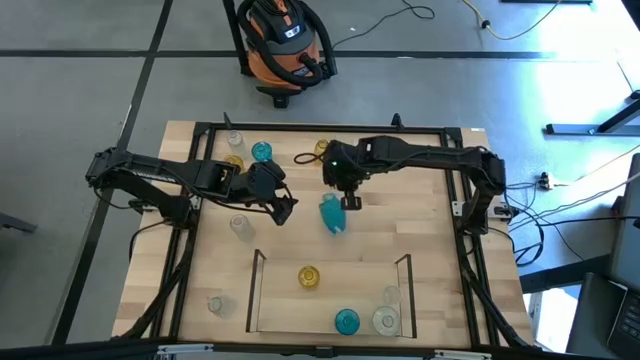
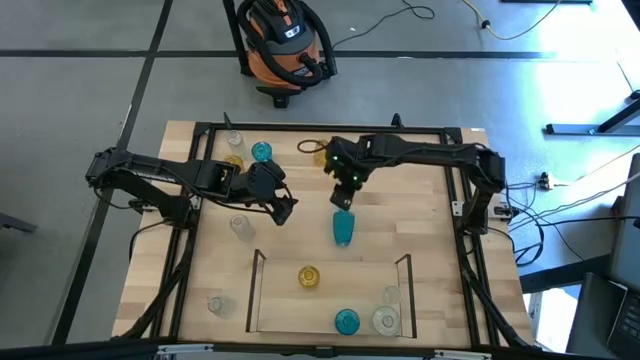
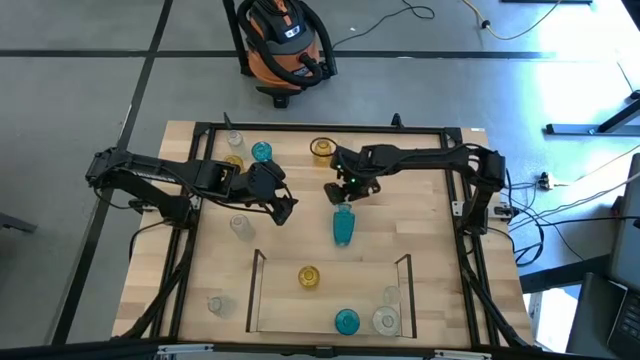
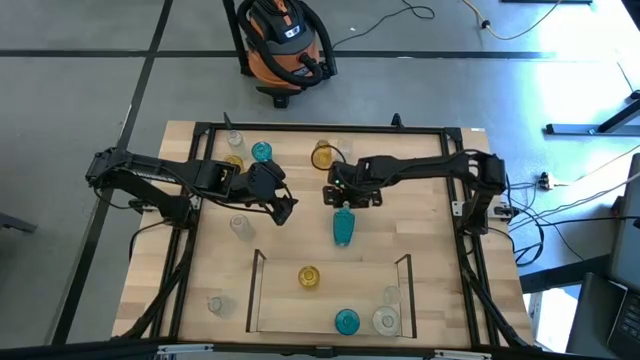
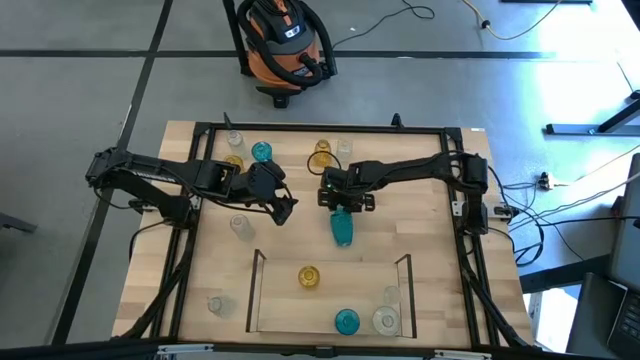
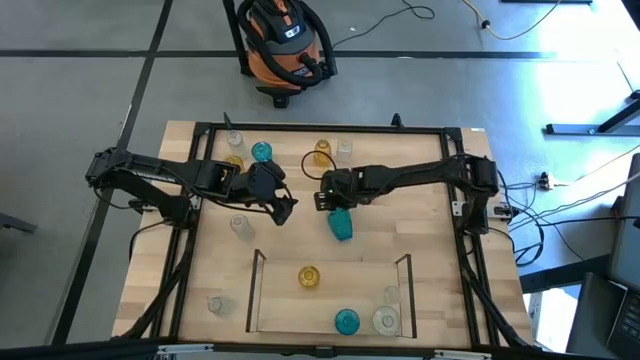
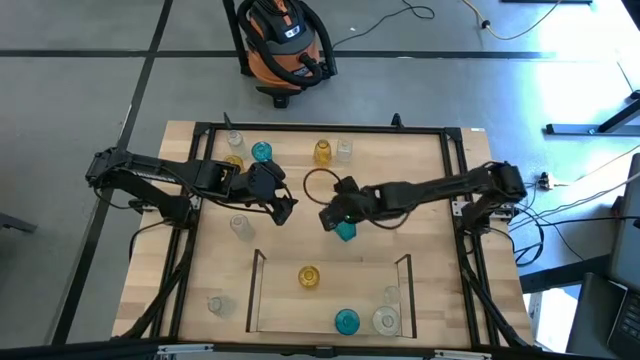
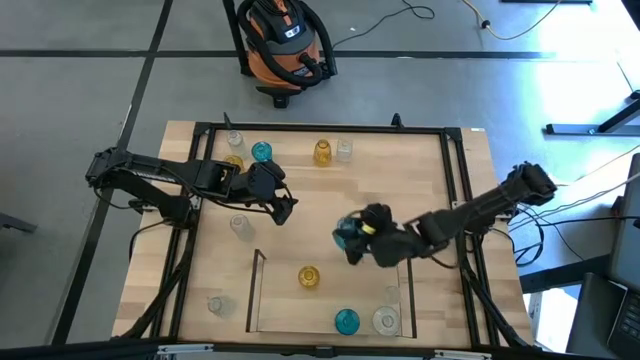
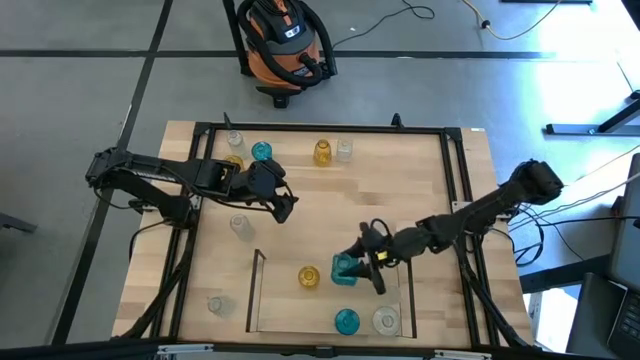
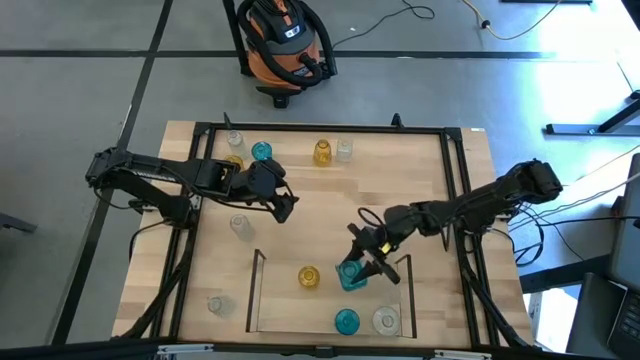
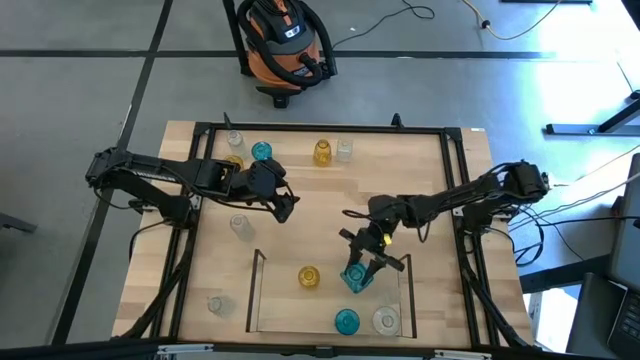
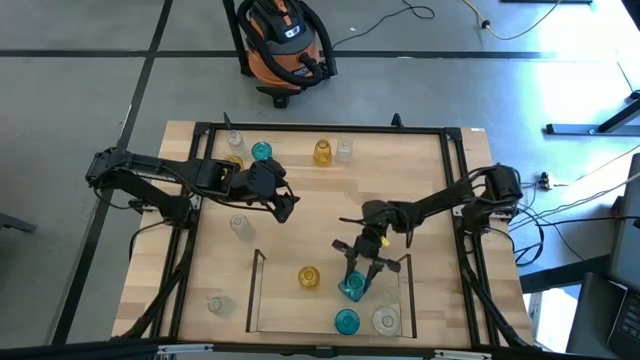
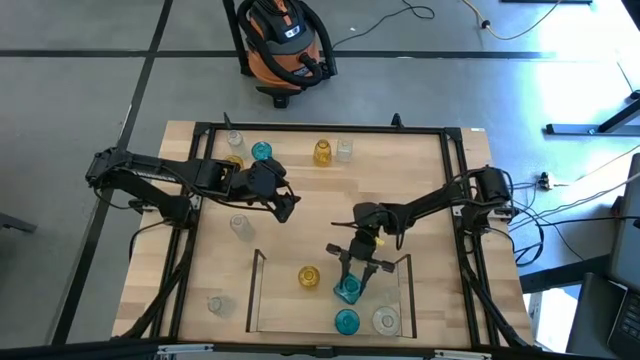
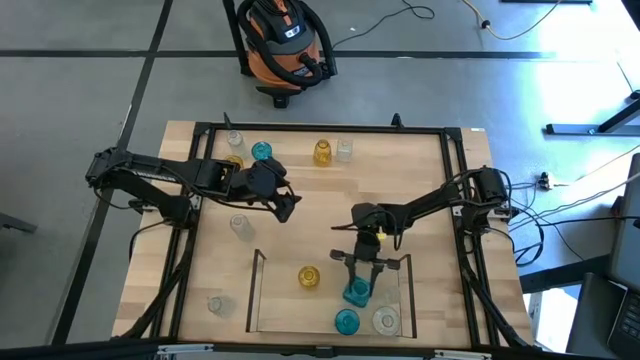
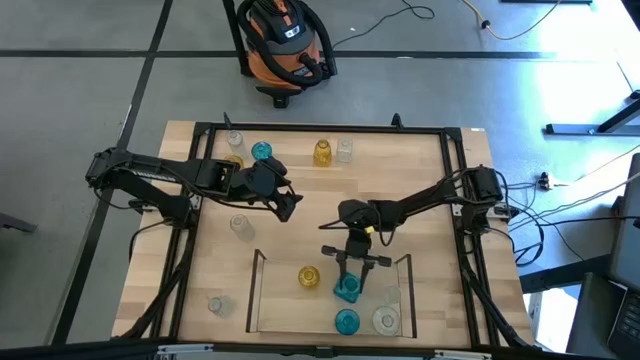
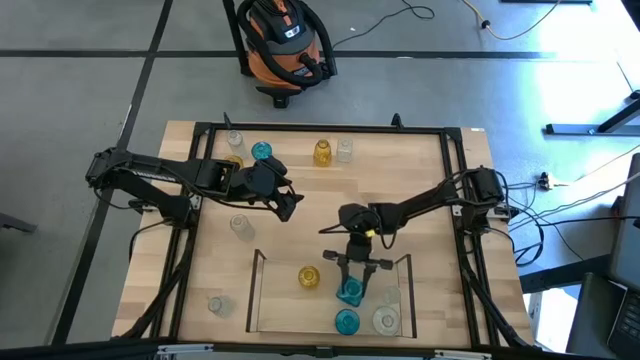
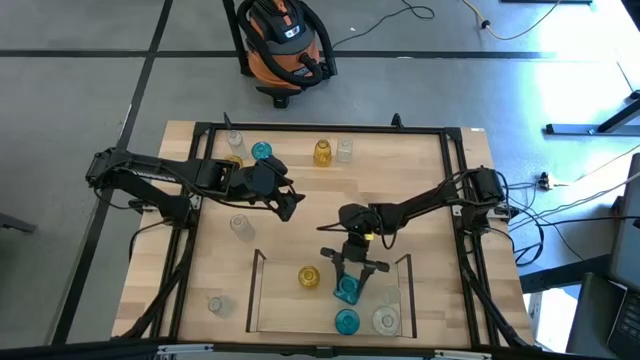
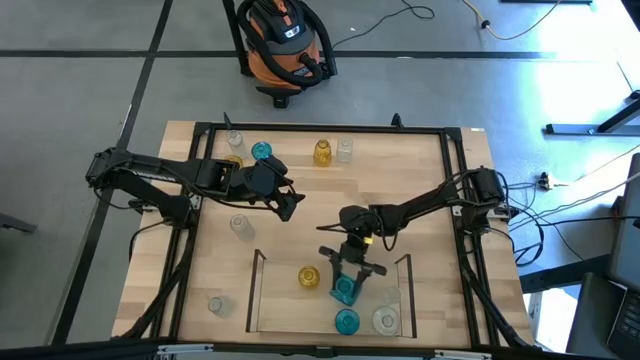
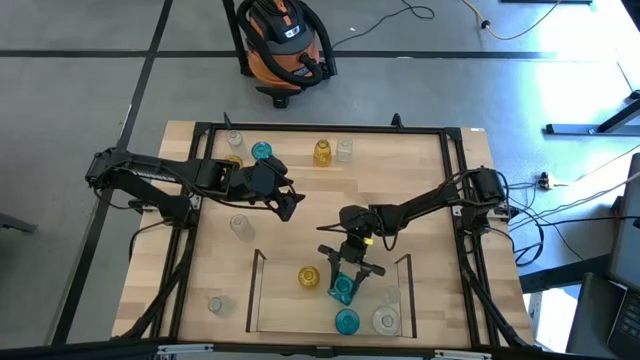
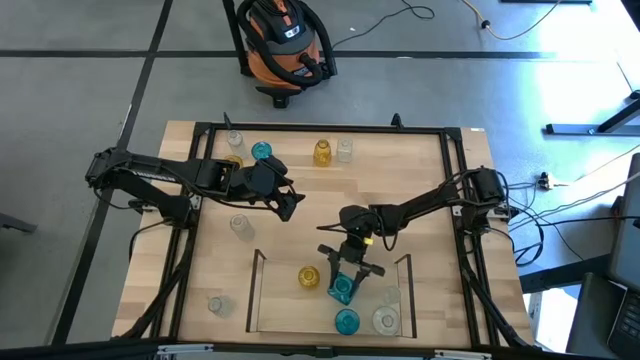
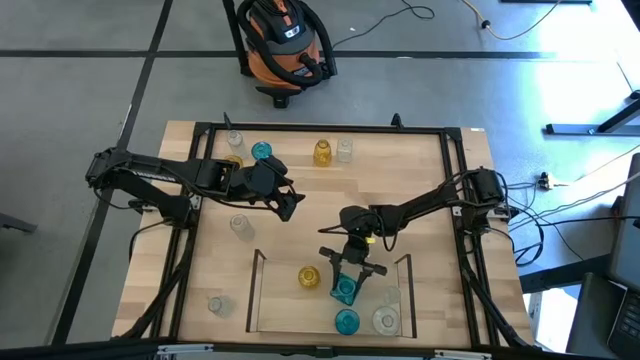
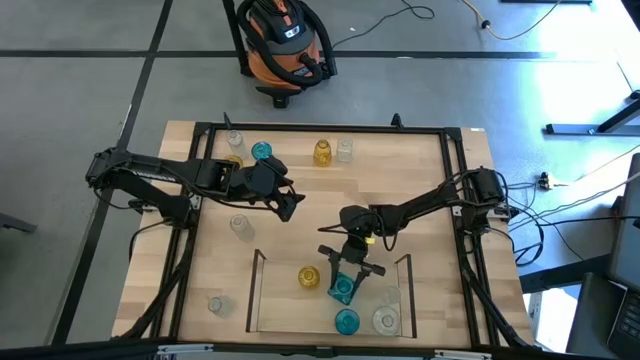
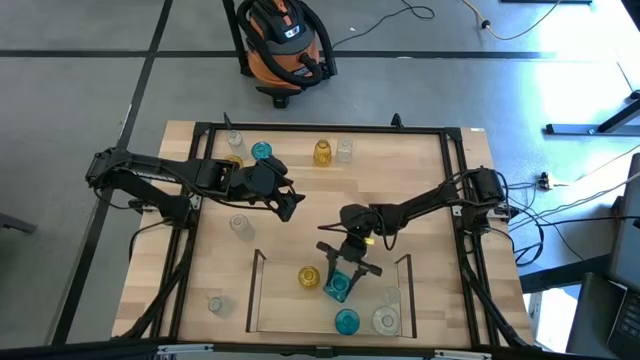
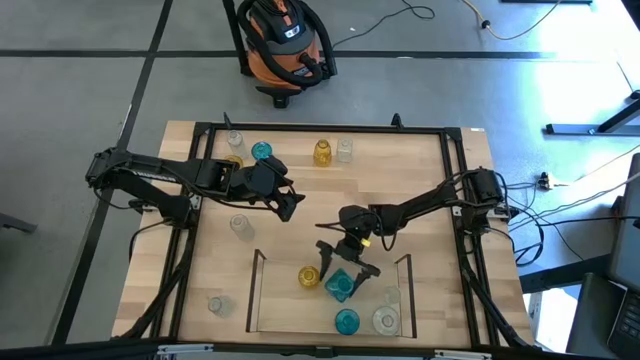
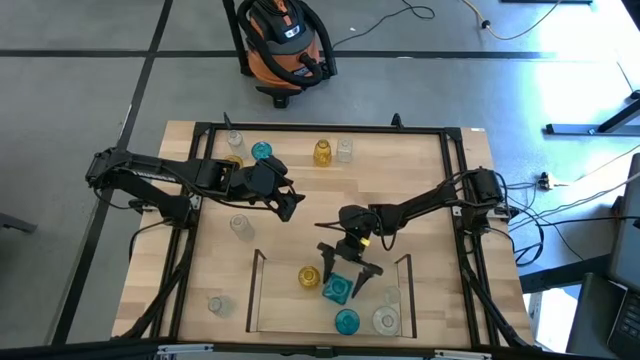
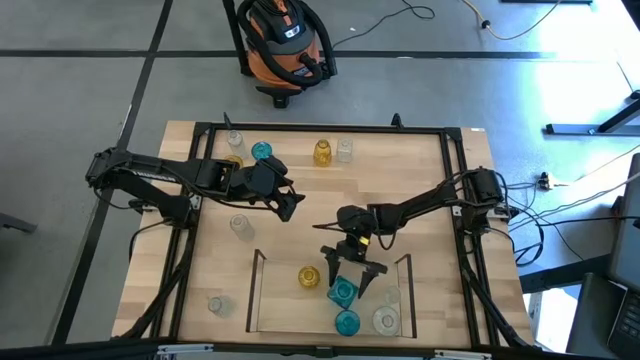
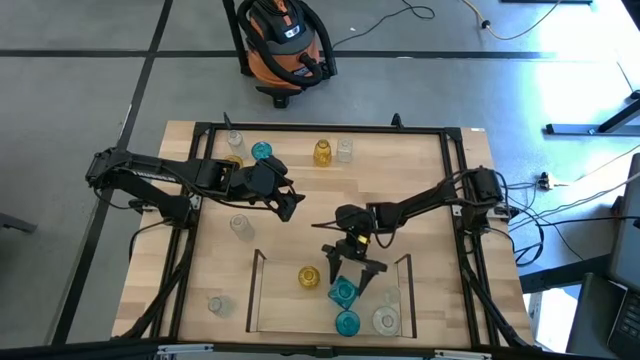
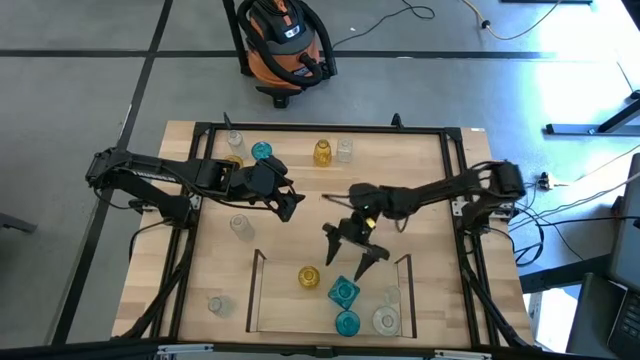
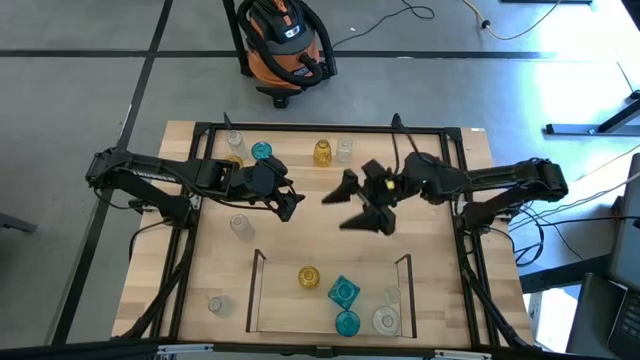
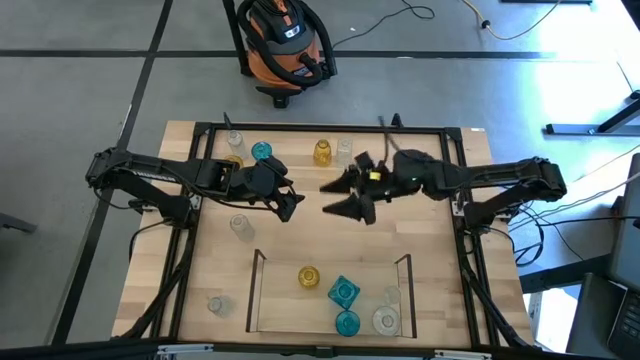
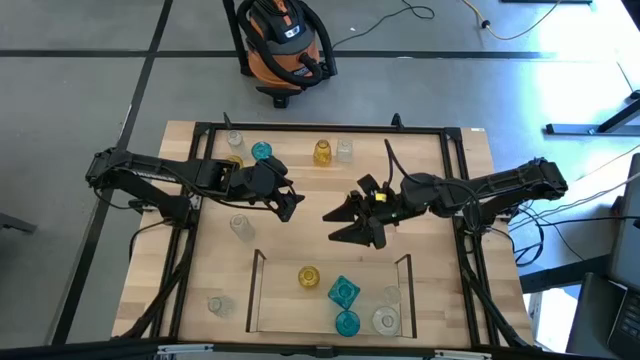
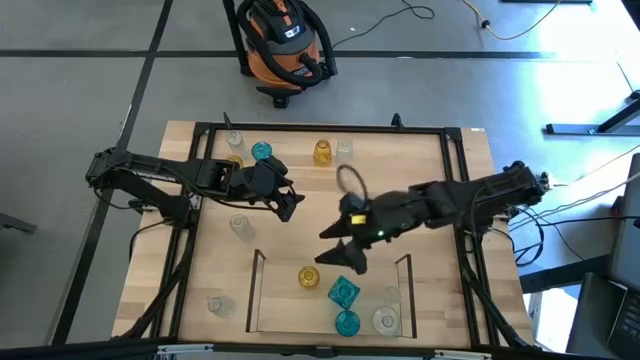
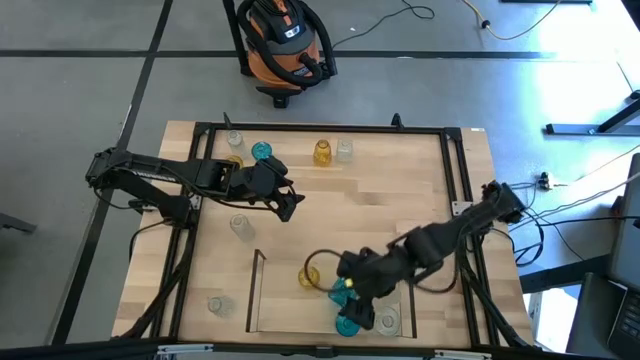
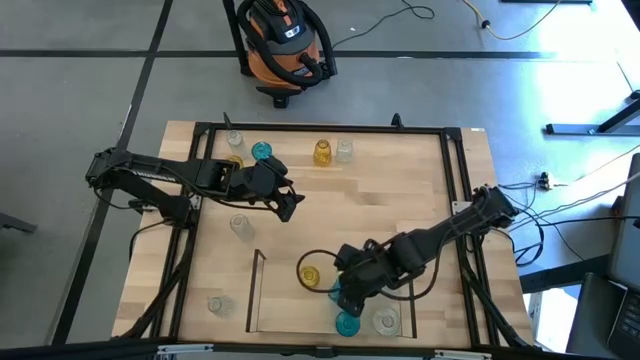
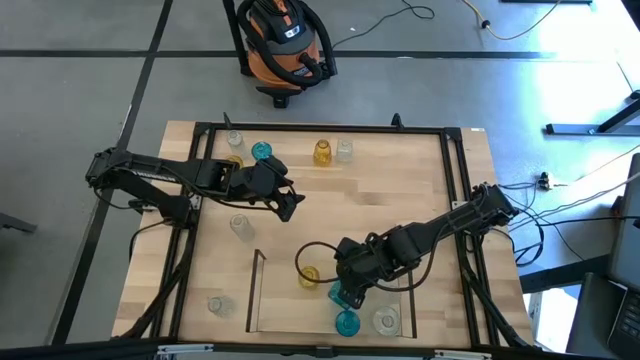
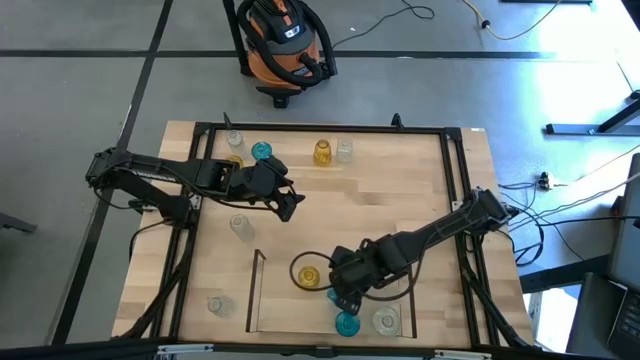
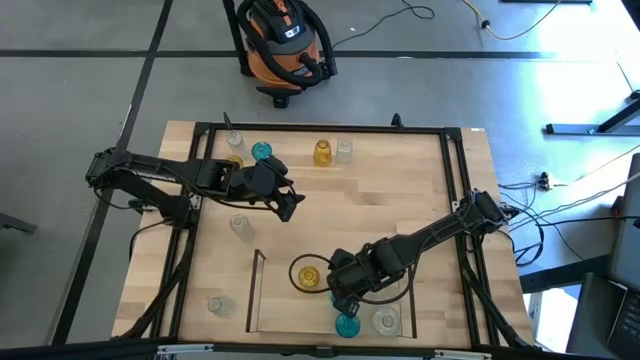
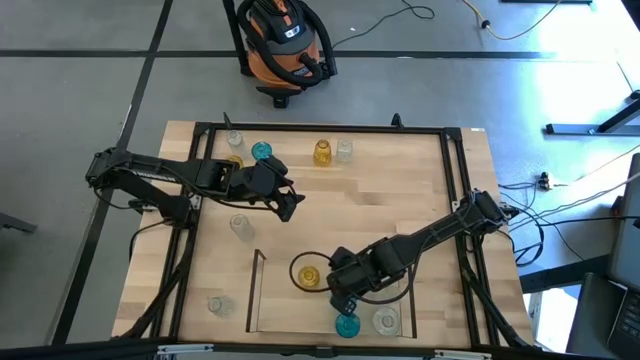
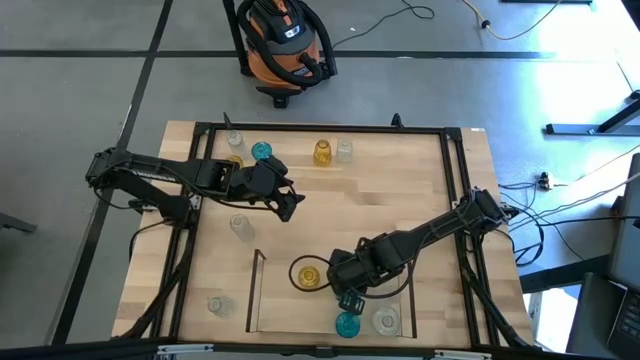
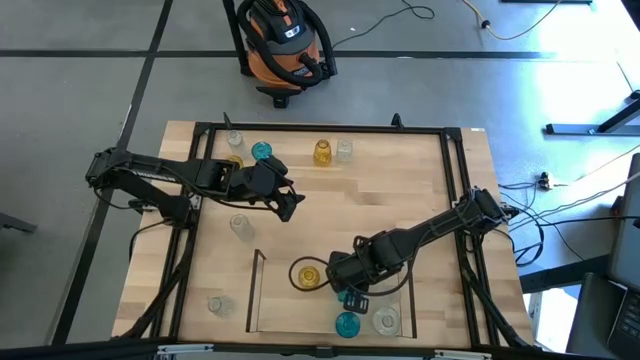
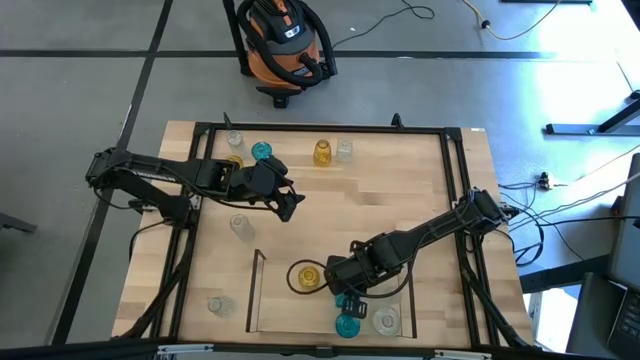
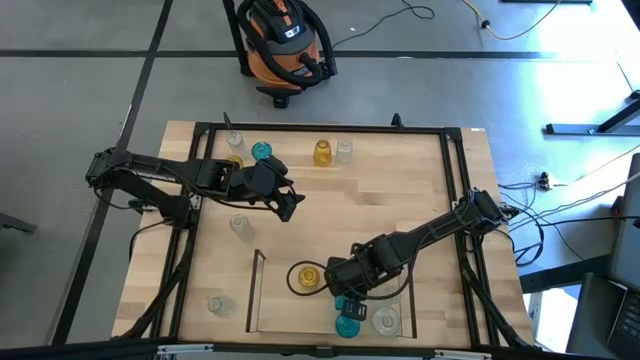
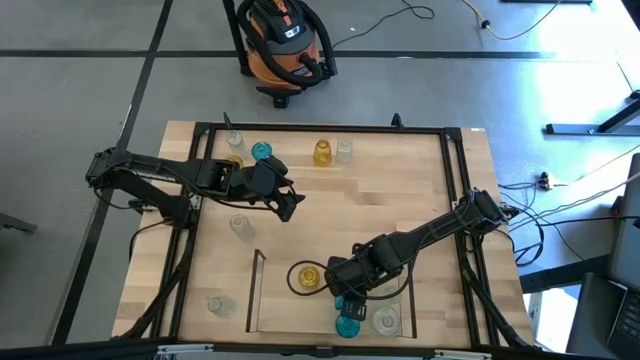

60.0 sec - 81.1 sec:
Task: sort vases onto shelf
Put the blue vase on the shelf aligned with the other blue vase
